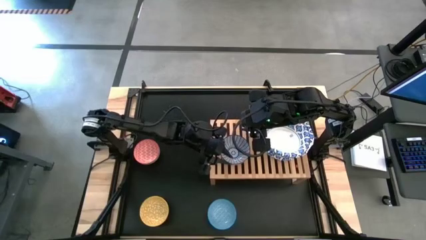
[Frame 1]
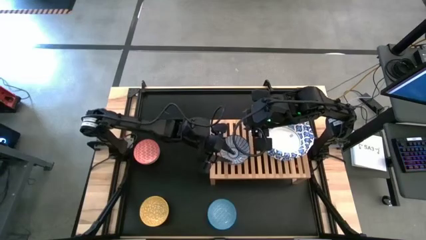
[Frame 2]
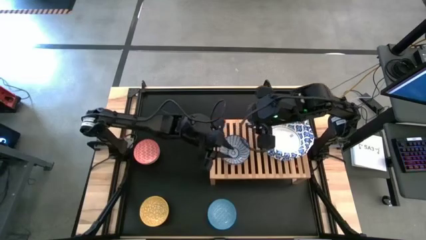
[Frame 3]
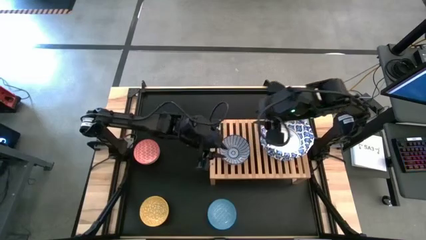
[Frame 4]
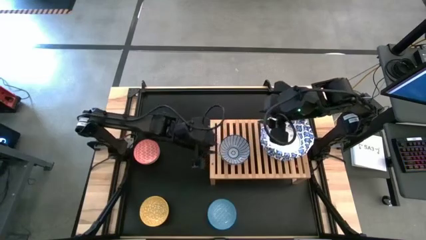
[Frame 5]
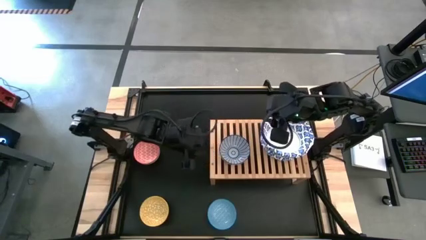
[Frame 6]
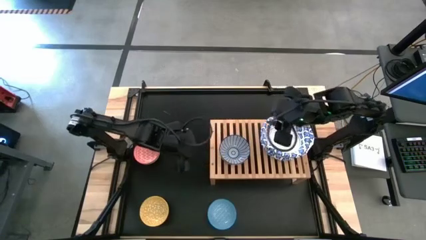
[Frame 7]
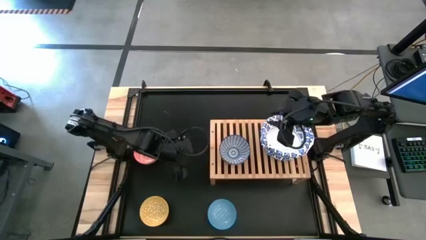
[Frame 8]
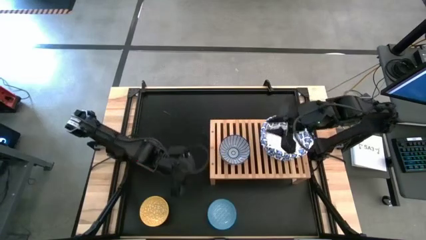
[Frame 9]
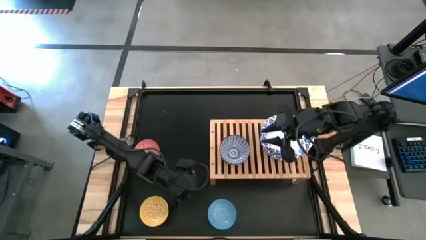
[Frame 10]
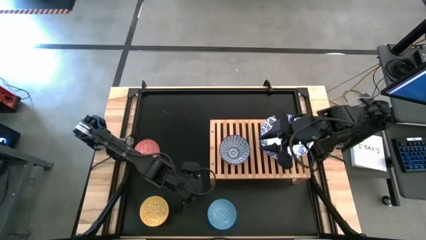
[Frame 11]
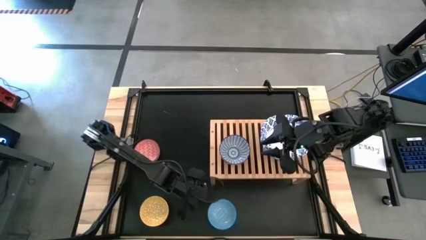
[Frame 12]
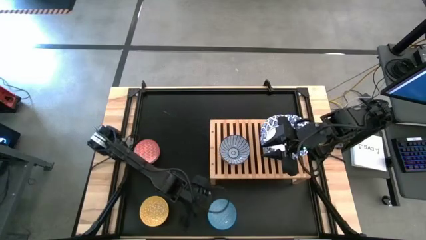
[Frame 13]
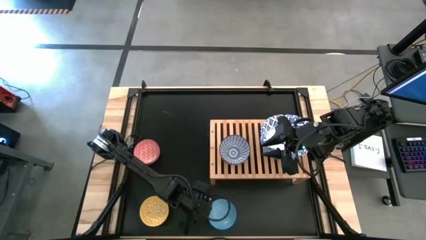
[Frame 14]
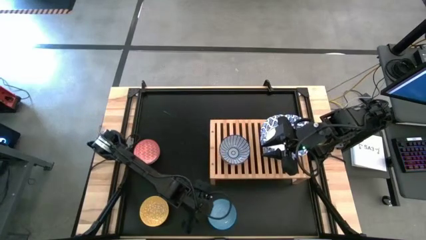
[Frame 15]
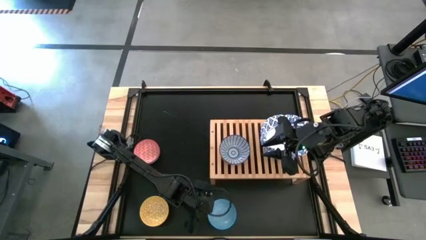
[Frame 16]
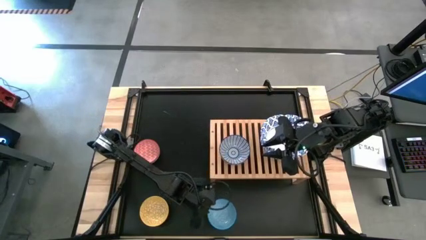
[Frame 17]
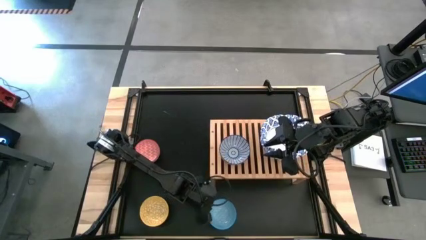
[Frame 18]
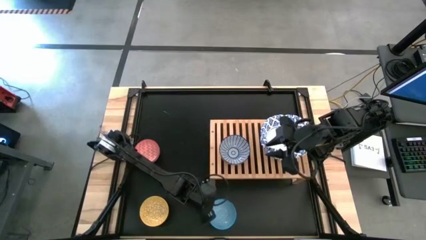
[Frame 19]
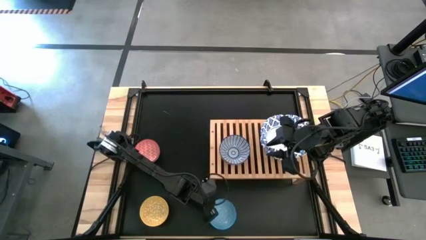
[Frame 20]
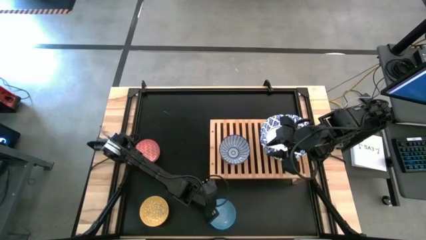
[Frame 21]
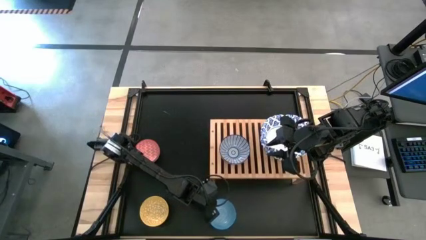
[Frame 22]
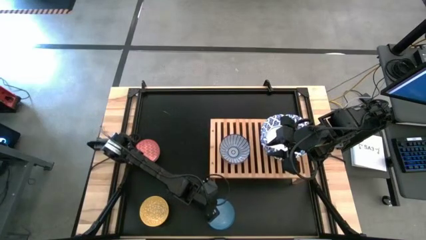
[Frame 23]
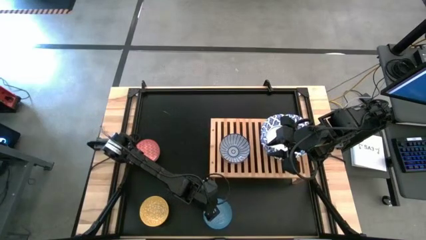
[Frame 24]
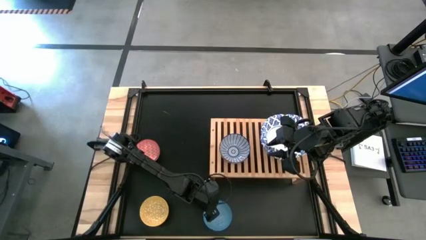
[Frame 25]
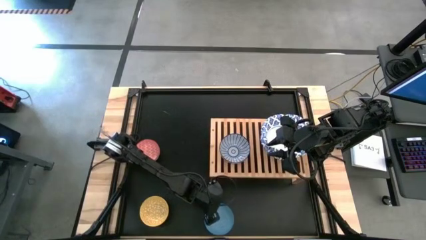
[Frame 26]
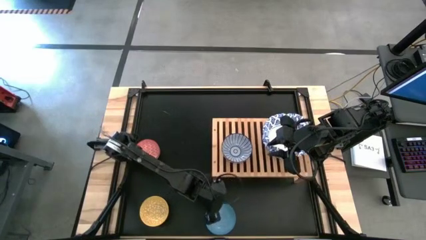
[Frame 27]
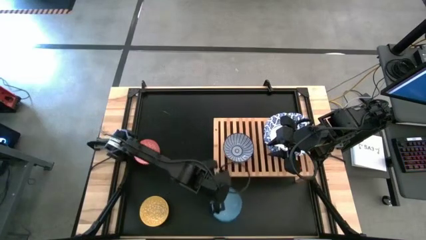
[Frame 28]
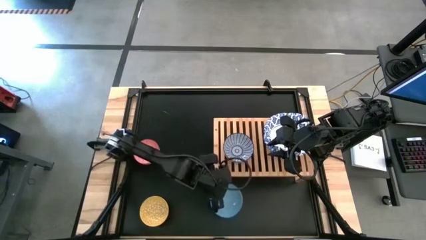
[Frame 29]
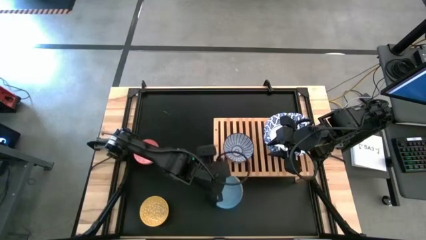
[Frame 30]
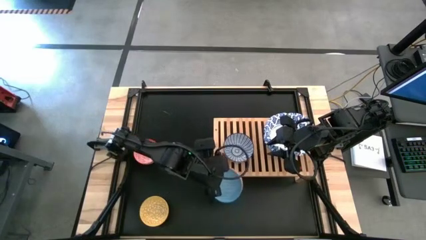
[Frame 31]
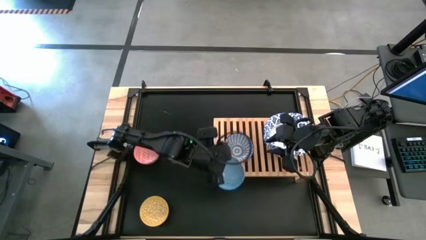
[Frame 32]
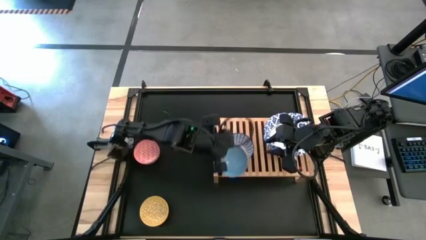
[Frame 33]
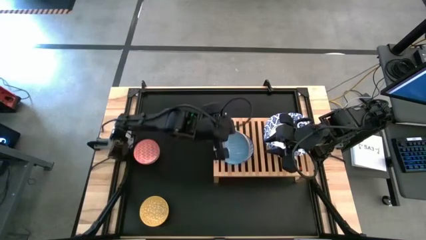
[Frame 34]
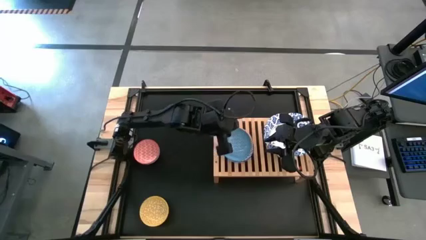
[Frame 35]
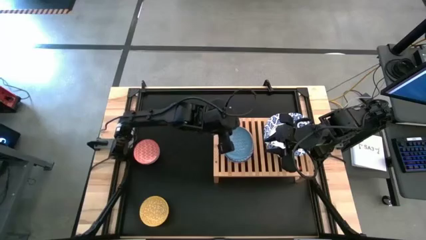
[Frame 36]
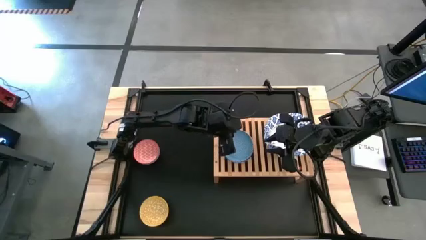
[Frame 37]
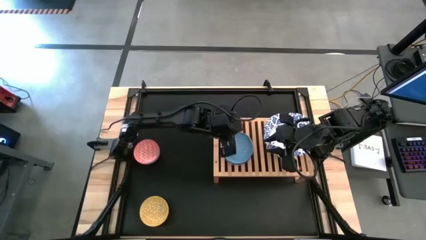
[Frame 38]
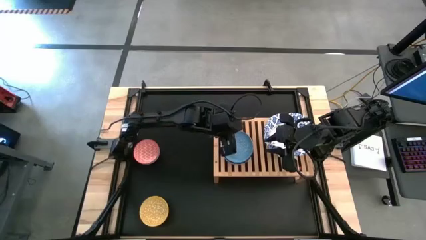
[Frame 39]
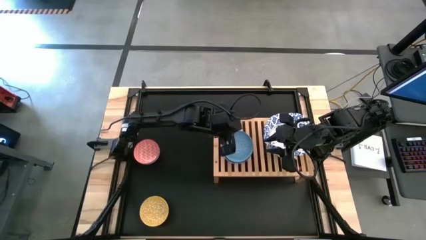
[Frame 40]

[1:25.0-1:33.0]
Task: Place and stack bowls onto a shelf
Stack the small yellow and blue bowl on top of the small red and blue bowl

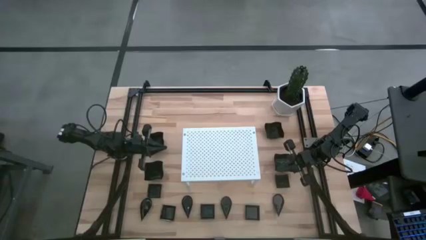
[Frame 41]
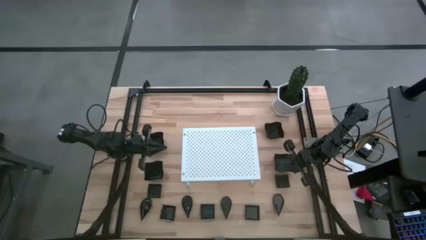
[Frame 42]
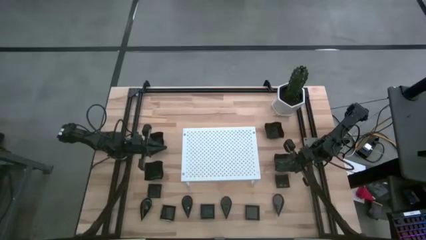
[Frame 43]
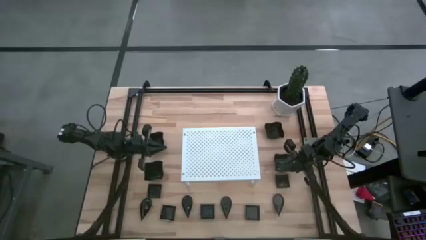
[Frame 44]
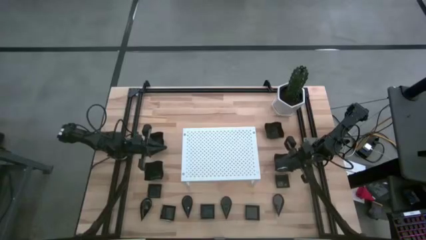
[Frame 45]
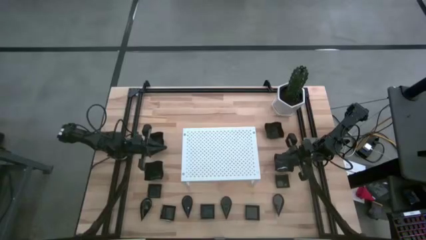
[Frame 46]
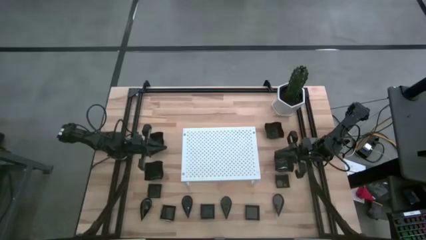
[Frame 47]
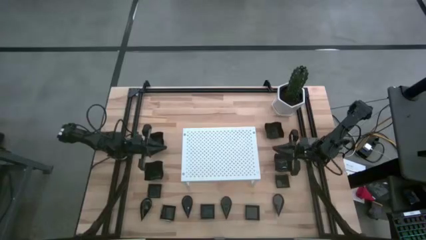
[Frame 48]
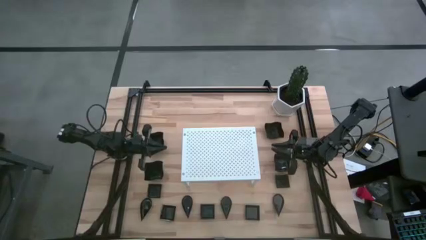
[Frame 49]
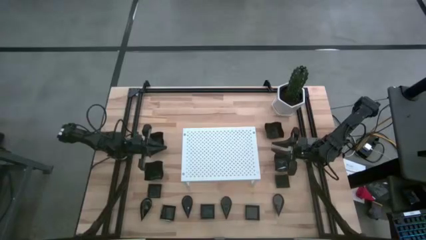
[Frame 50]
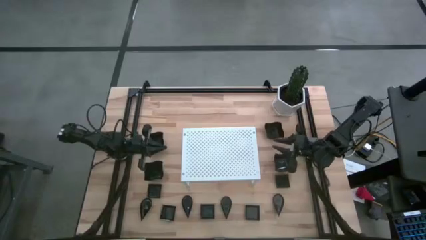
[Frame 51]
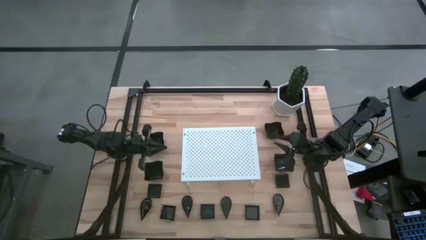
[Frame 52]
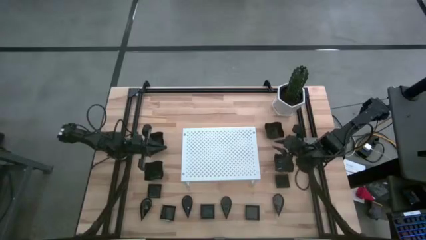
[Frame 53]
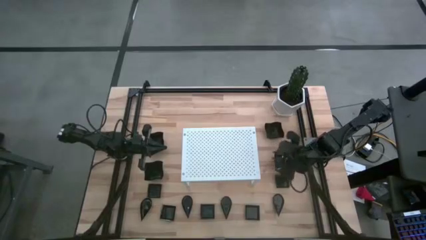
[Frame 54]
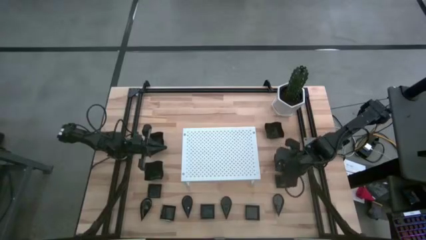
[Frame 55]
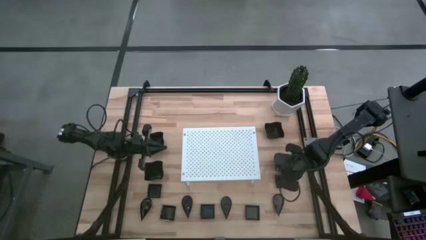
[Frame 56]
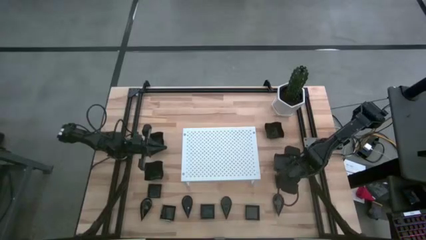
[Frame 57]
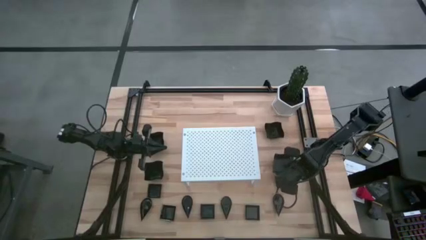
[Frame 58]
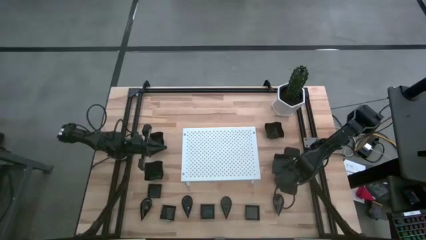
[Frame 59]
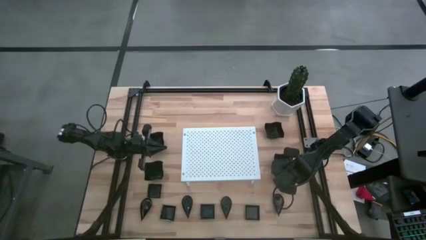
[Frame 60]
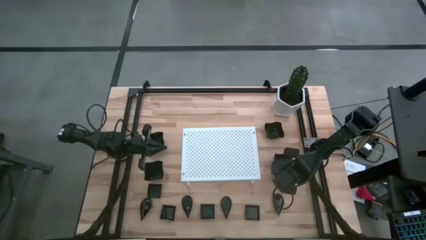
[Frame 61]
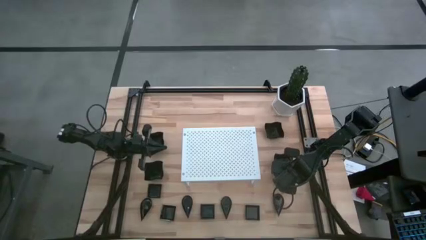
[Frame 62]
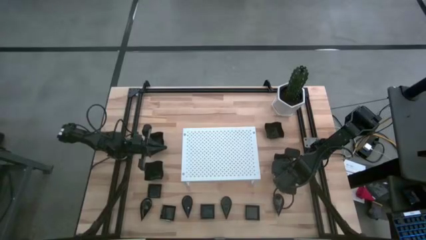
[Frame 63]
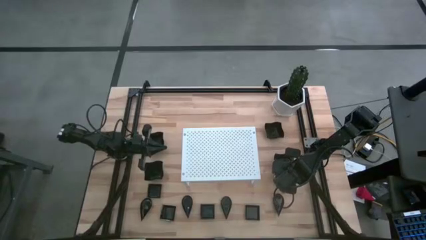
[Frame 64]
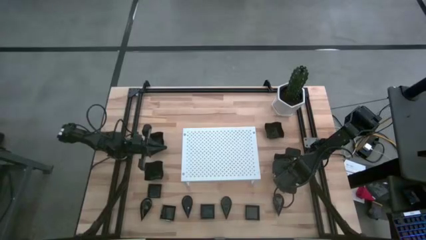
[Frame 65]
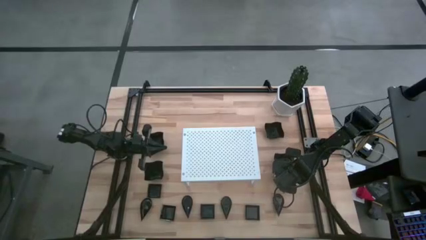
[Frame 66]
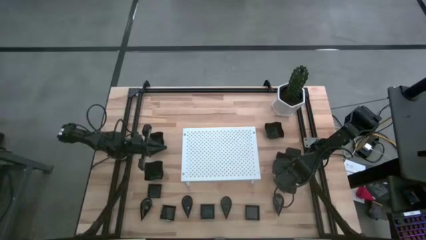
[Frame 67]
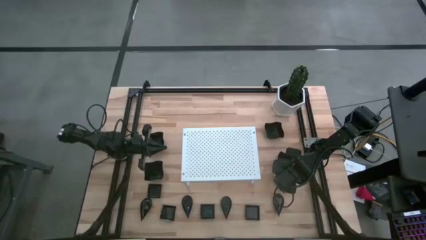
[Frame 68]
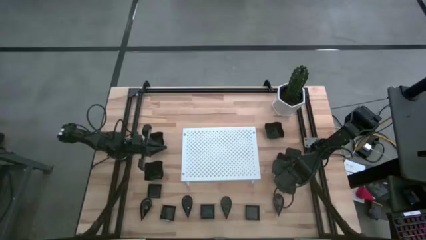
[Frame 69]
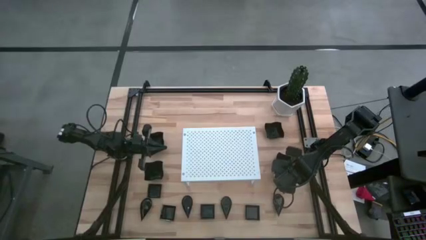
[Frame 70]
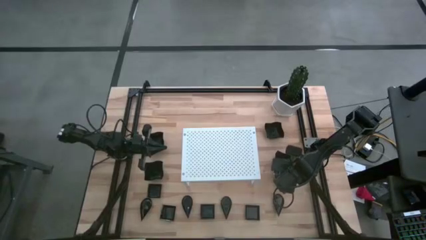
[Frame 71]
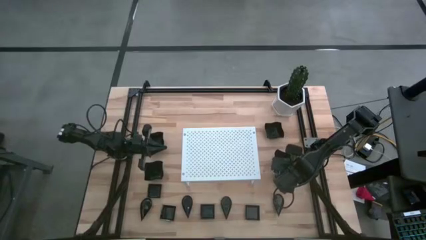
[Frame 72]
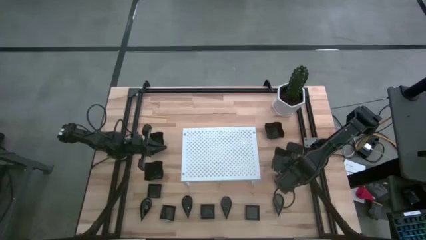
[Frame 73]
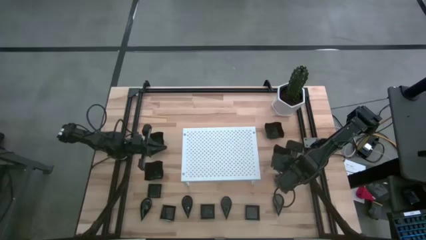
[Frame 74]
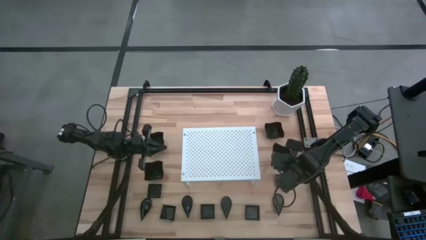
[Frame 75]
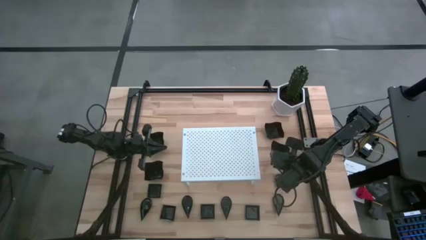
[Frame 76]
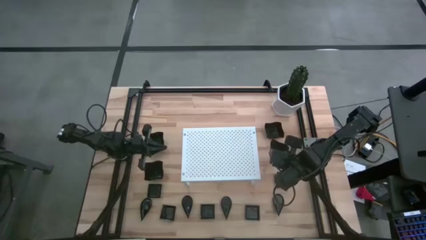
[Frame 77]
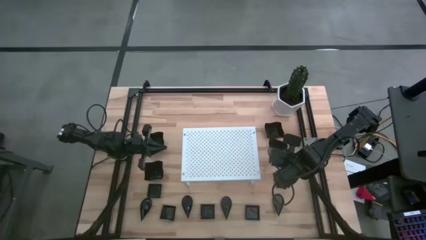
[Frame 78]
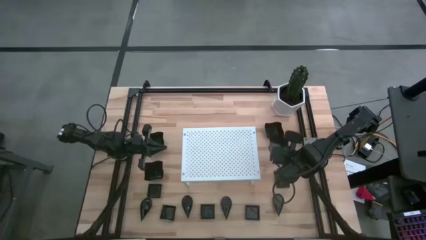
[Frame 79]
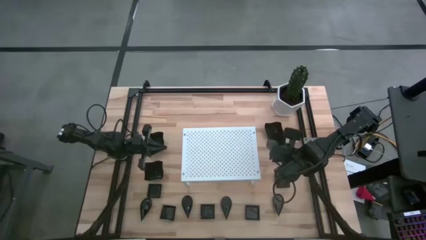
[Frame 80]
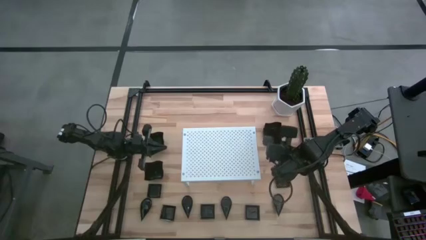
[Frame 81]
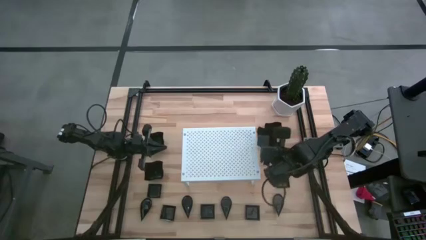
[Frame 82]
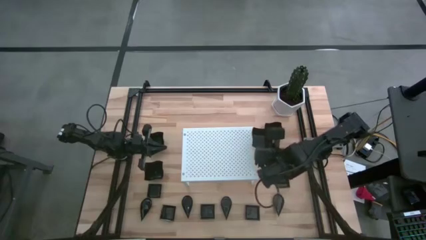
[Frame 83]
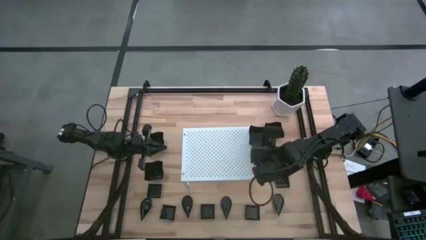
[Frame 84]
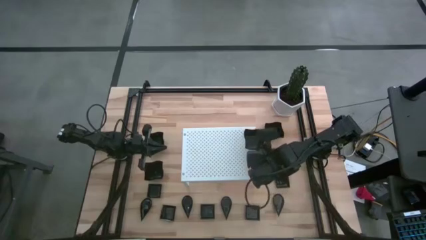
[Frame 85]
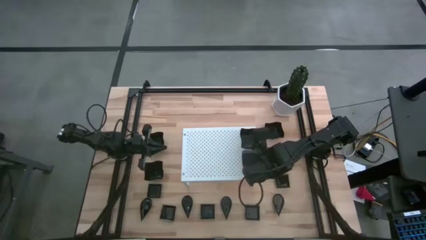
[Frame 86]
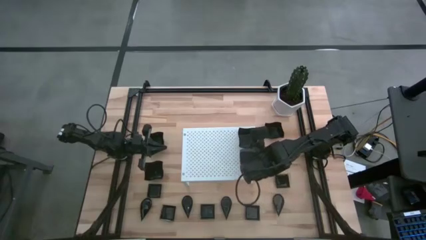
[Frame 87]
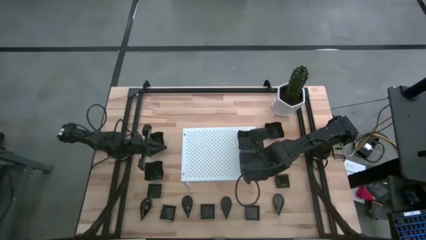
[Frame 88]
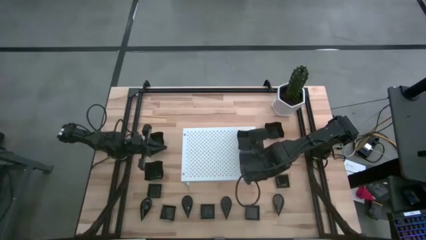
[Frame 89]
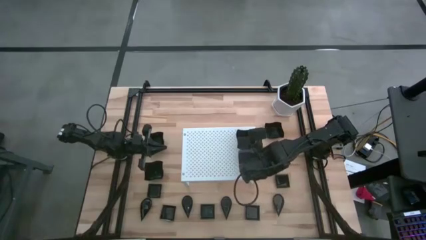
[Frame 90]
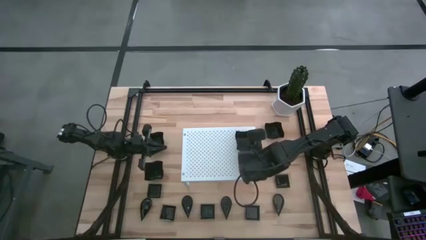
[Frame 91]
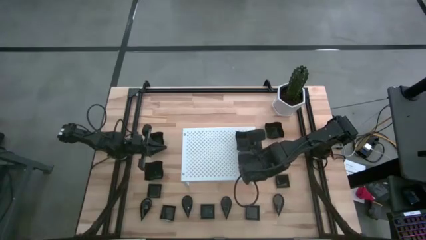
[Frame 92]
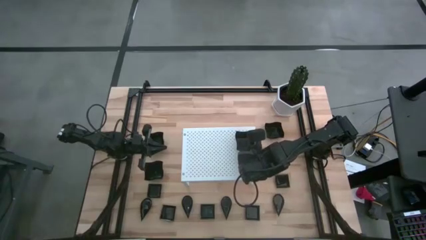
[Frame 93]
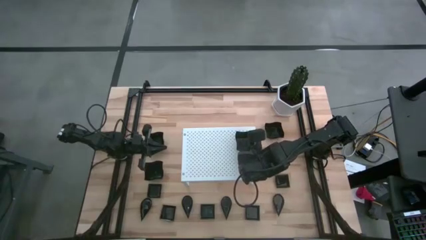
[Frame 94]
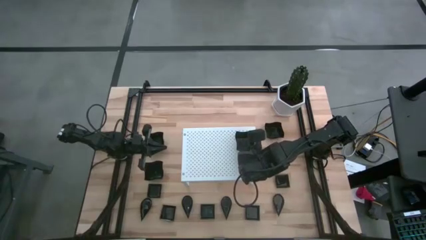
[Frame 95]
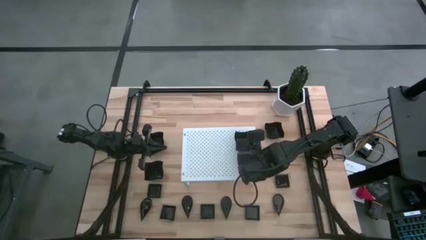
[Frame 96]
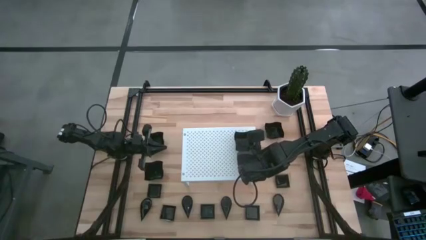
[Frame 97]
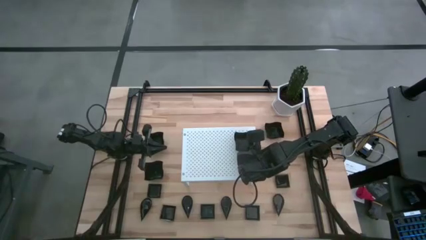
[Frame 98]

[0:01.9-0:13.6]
Task: Pick & Place Mini shaped plates
Put the distorted square plate on the shelf
